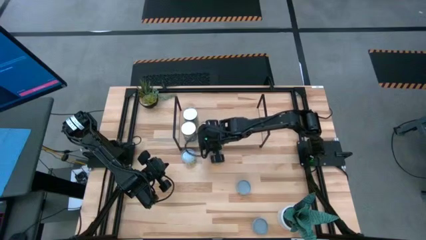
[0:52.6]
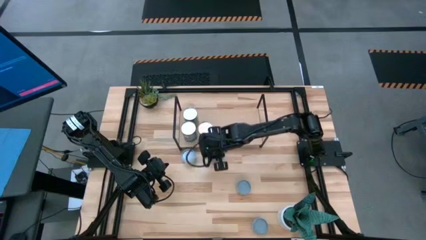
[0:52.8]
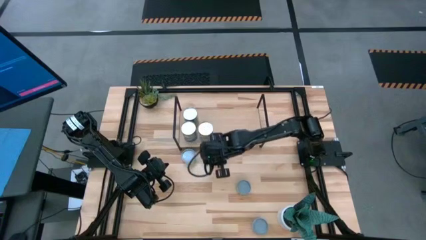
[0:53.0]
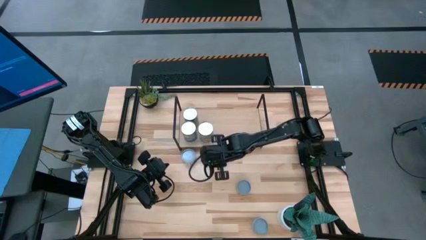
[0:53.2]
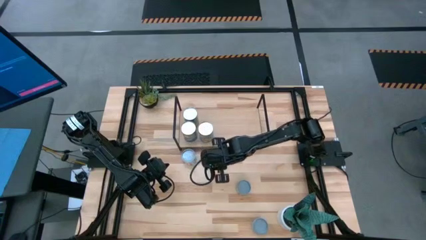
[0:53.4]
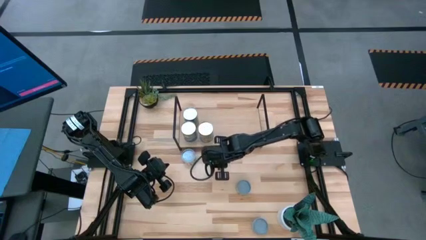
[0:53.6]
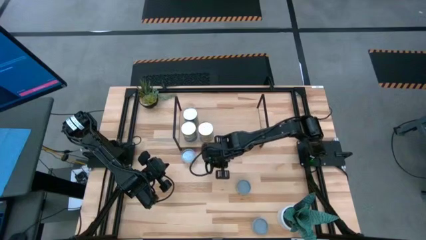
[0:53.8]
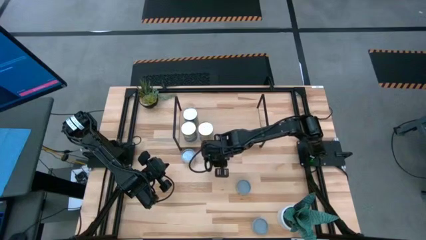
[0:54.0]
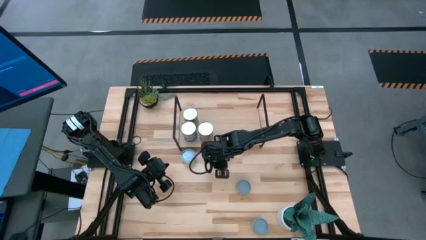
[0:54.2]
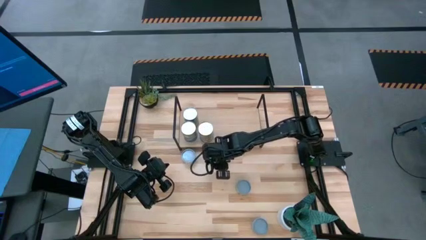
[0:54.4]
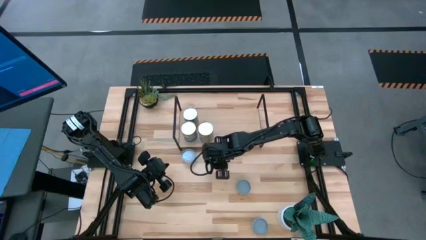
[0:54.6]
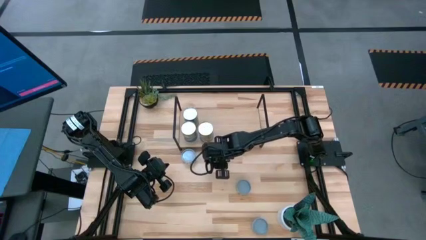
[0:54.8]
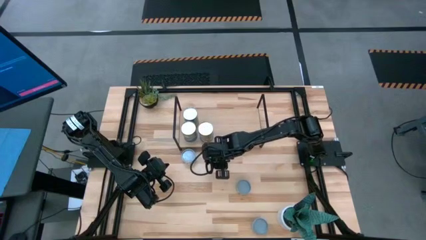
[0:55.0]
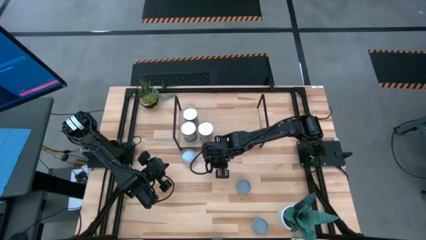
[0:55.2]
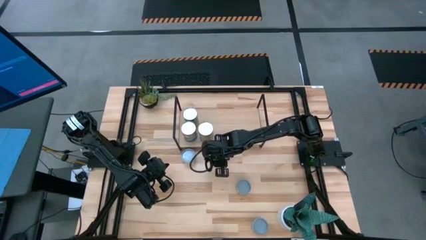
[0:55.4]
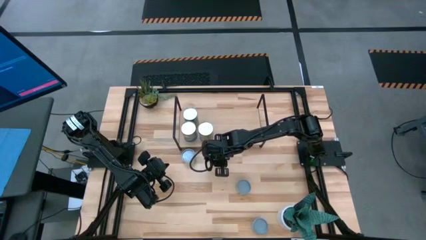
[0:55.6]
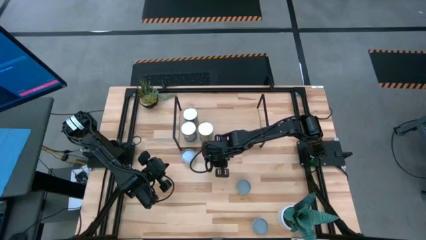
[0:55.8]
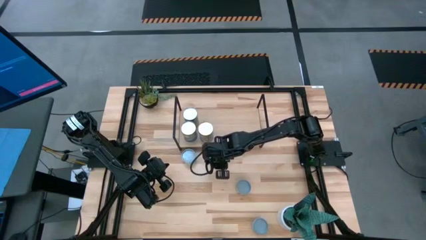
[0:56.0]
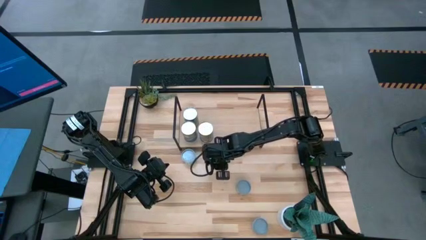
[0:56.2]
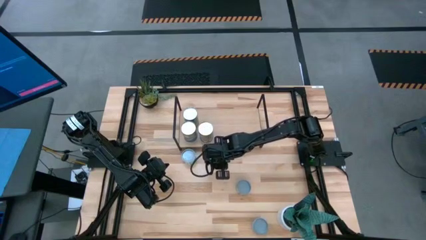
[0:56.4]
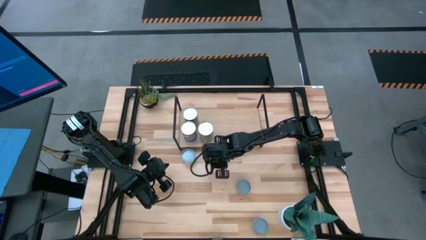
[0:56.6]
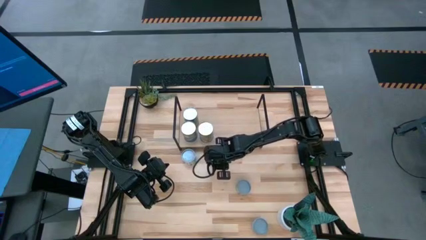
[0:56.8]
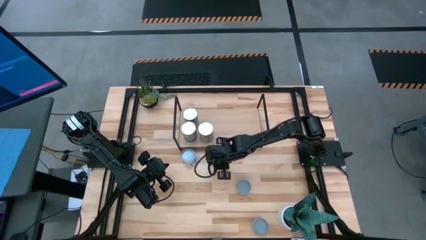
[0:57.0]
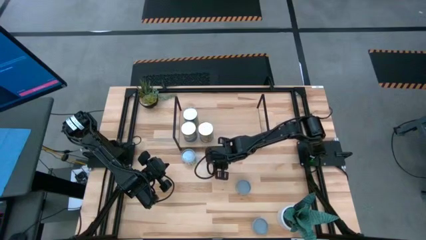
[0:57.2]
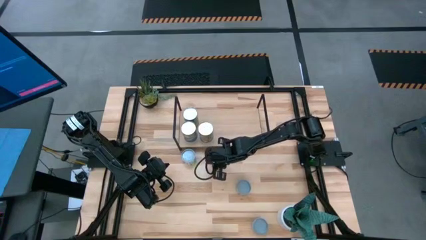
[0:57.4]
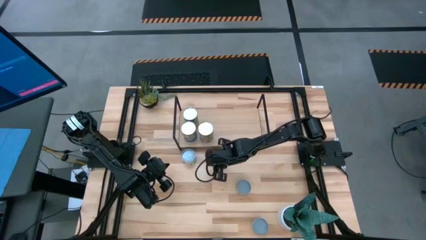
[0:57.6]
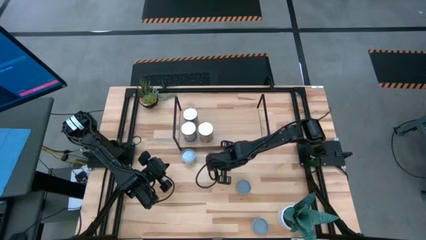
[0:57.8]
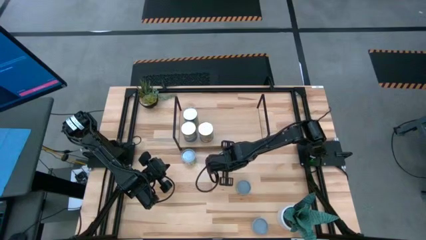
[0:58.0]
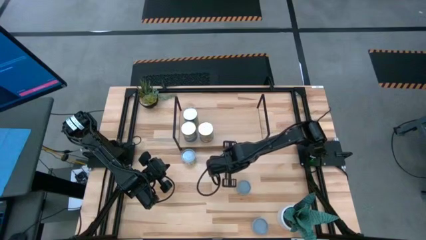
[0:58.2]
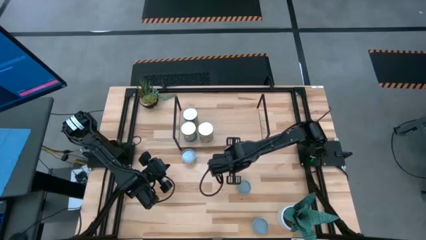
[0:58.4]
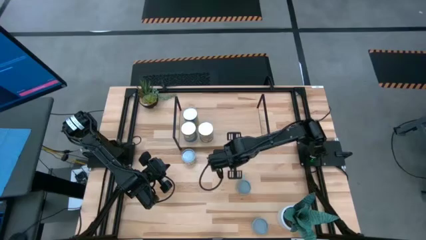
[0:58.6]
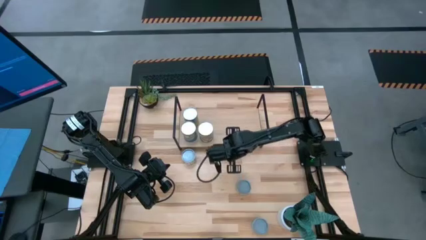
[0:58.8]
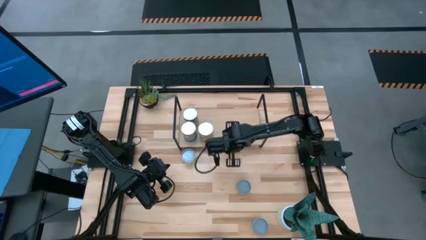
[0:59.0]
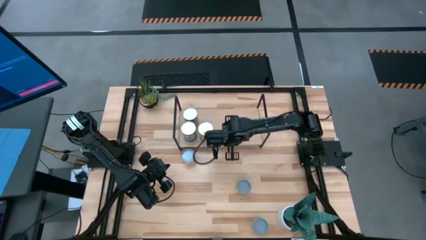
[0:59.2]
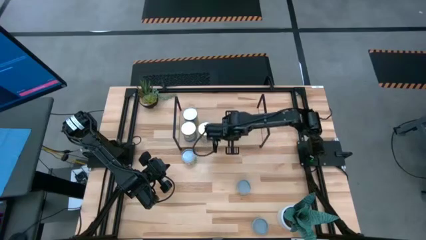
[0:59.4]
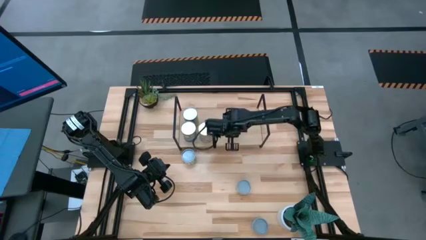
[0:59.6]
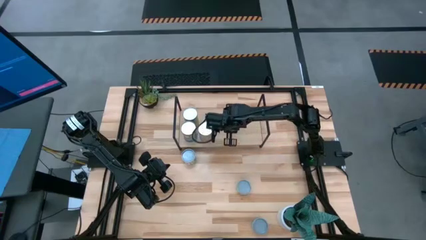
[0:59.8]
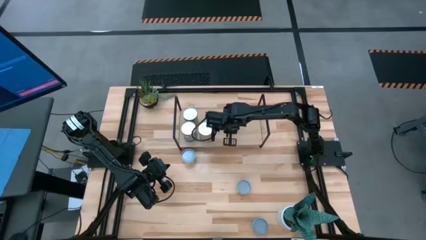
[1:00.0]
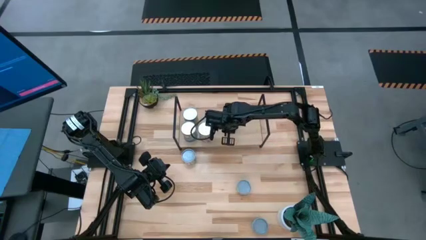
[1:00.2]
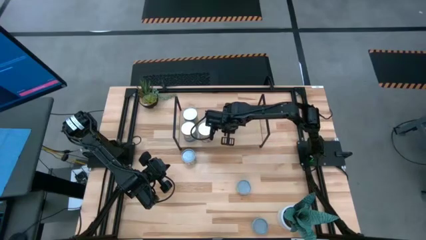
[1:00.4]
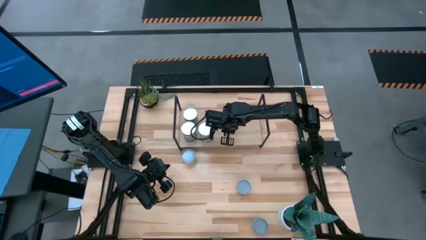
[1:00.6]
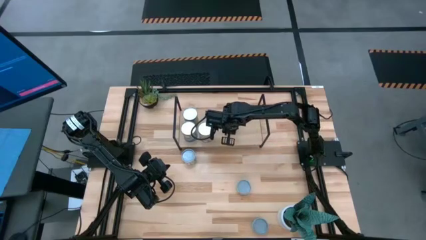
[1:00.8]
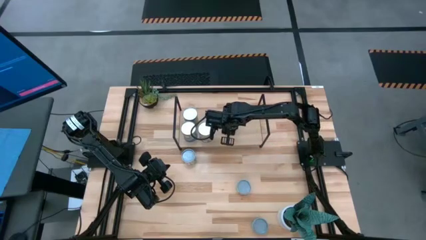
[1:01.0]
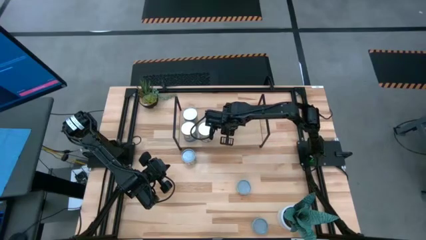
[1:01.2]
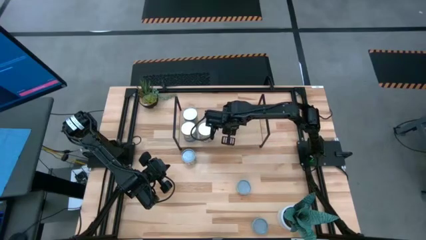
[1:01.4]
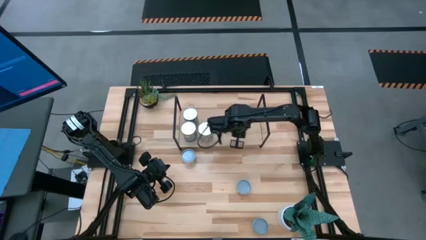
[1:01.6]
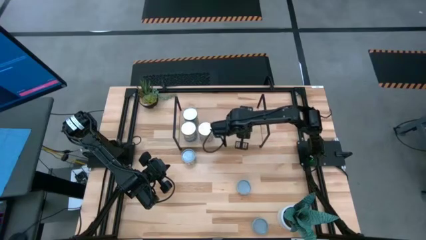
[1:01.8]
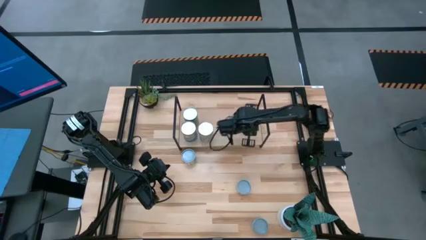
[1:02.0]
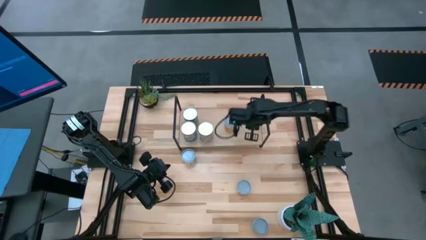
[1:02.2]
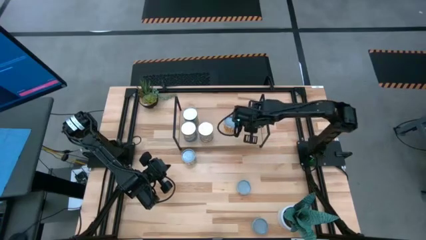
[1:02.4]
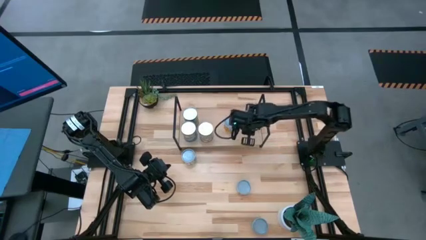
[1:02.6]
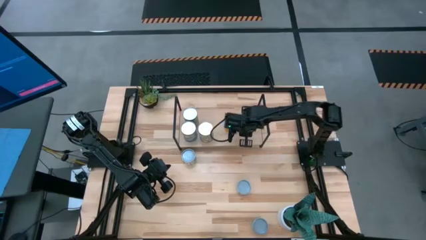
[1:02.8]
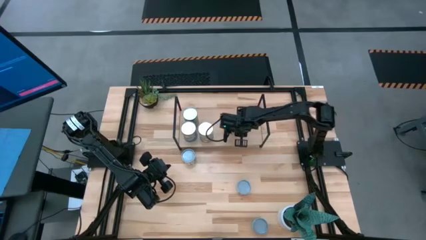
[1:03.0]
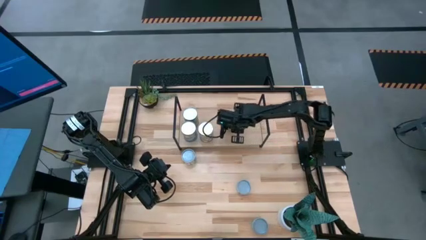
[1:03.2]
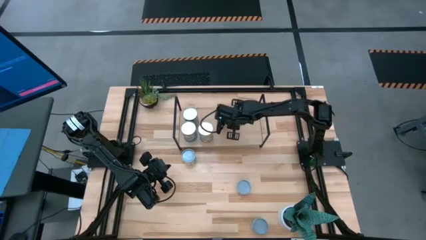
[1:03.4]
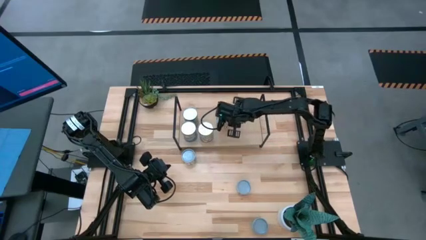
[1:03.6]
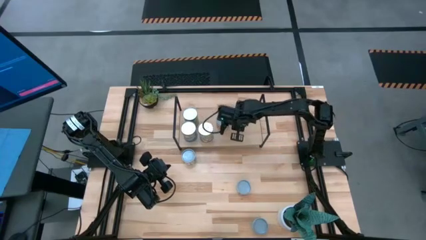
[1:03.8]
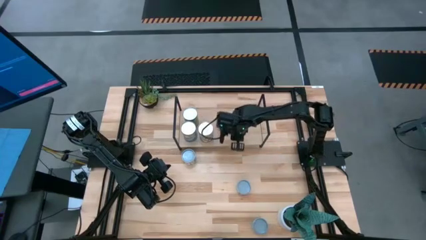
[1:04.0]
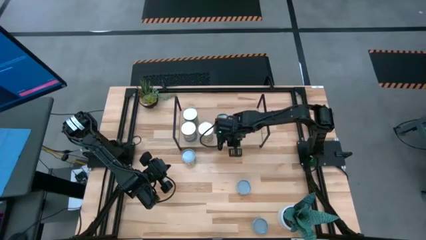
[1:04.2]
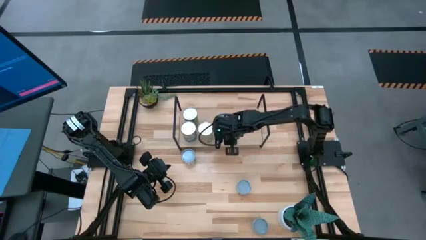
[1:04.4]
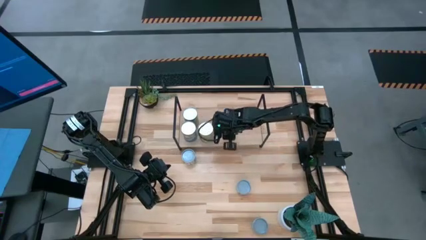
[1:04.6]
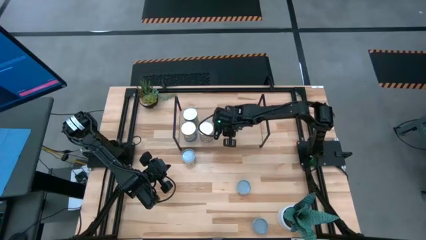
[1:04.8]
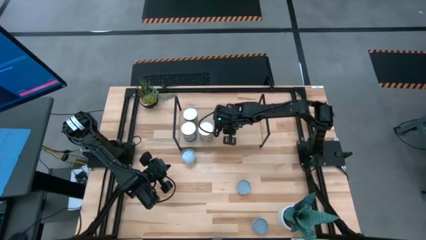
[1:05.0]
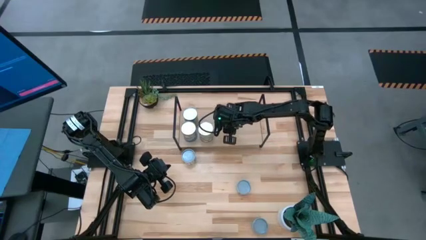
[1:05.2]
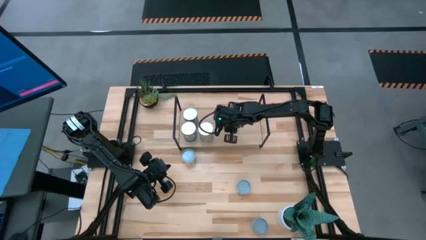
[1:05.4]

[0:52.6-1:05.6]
Task: Pick and place cans onto a shelf
Put the canned black beans on the shelf

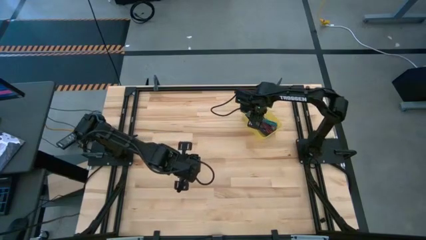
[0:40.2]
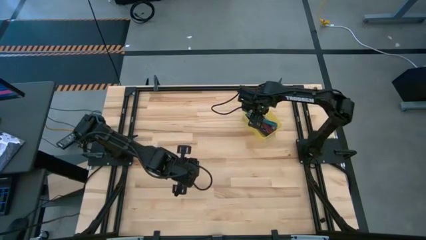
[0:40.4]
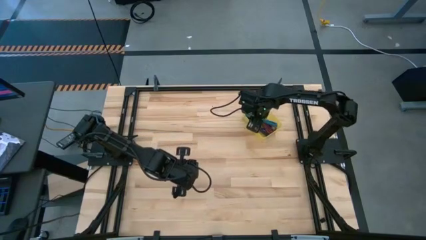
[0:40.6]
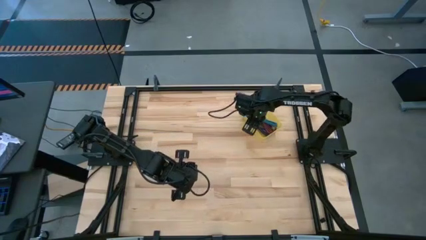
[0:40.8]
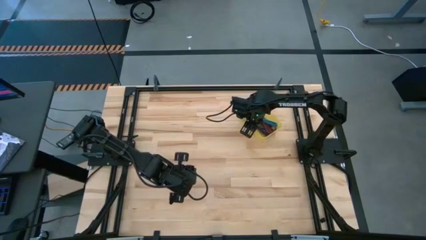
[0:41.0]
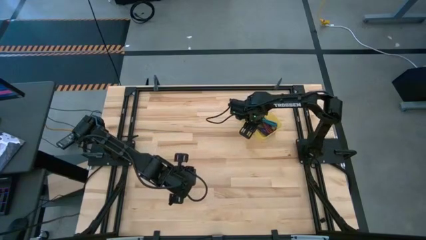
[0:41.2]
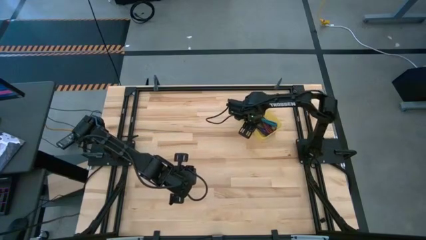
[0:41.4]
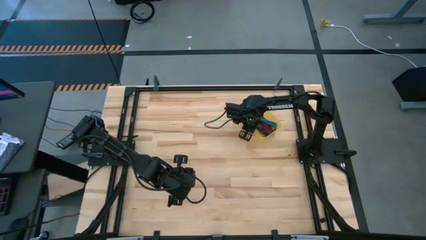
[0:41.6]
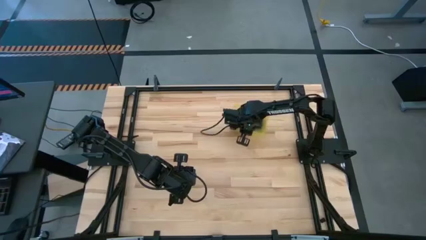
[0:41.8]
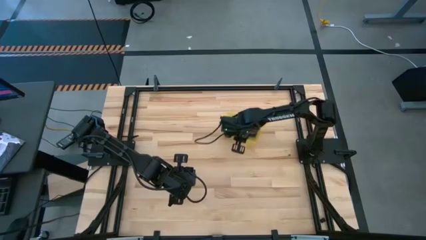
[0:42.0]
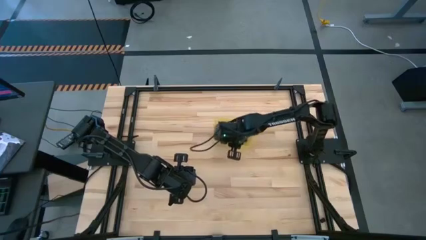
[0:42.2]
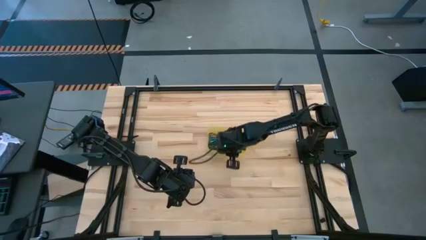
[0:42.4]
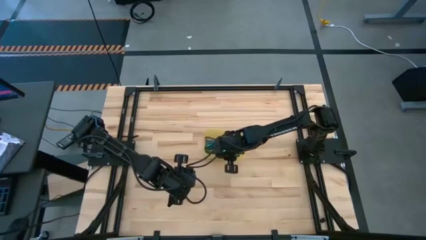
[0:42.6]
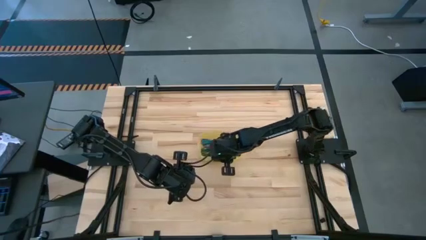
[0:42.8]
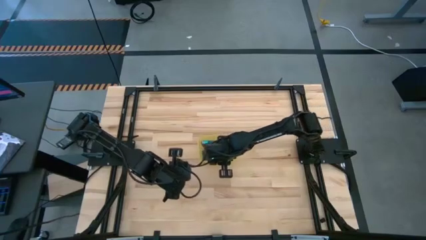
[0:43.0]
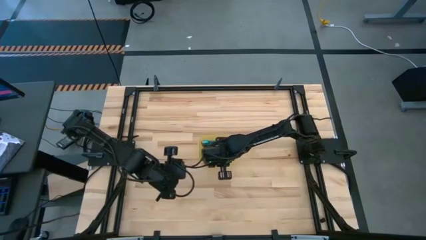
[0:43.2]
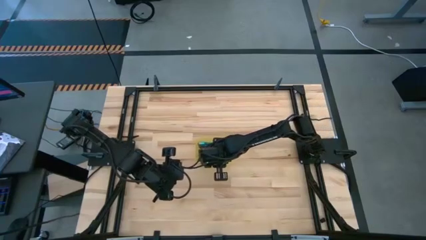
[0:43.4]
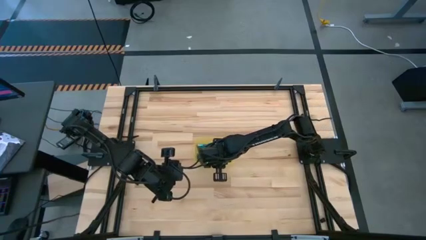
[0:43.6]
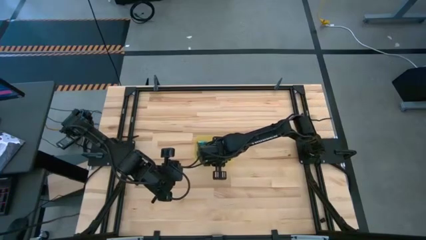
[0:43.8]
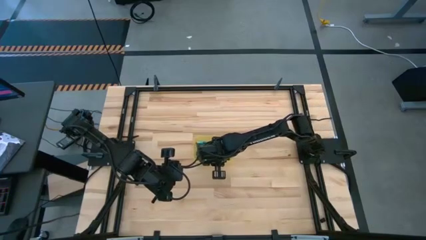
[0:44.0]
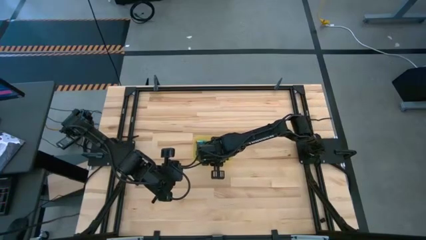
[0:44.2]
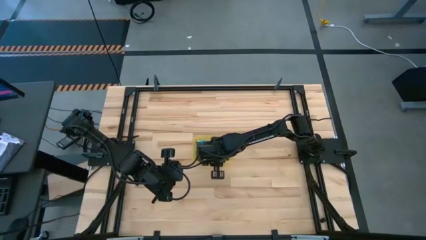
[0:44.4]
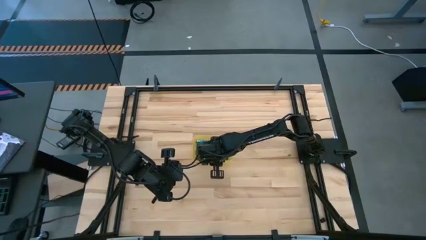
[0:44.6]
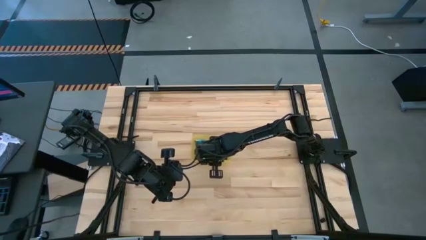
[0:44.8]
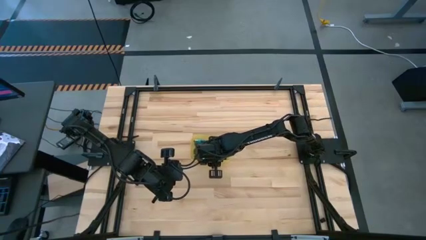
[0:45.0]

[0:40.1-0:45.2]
Task: Pick and place USB-C Cables
Move the yellow bin to the center of the table
